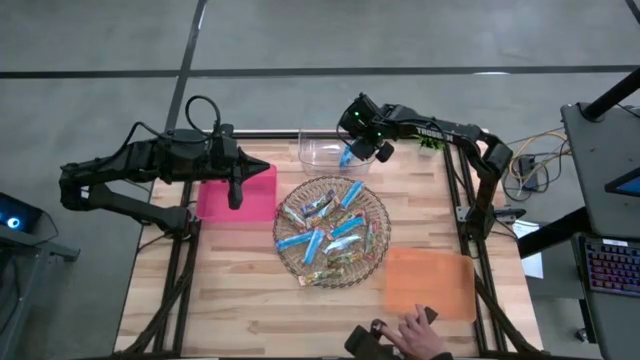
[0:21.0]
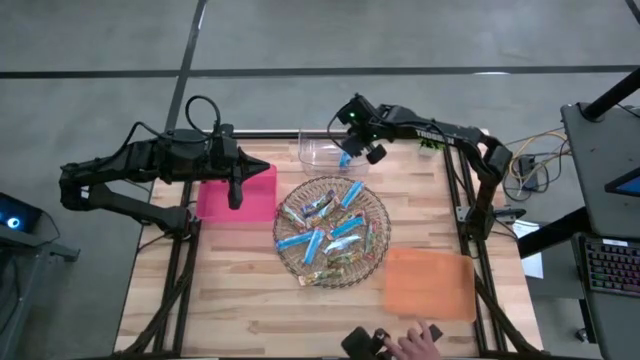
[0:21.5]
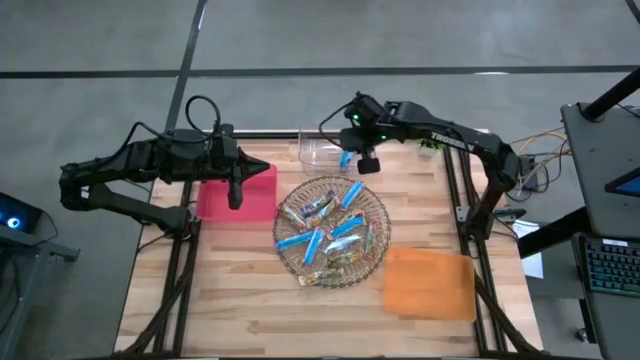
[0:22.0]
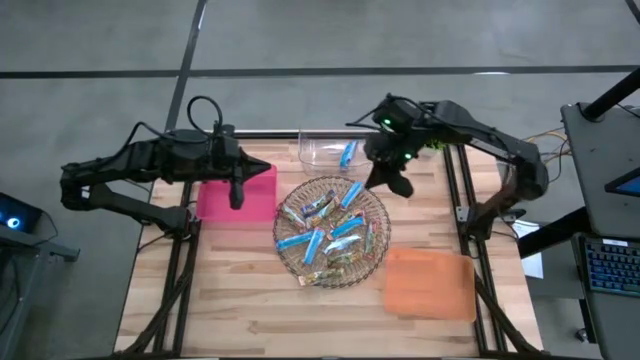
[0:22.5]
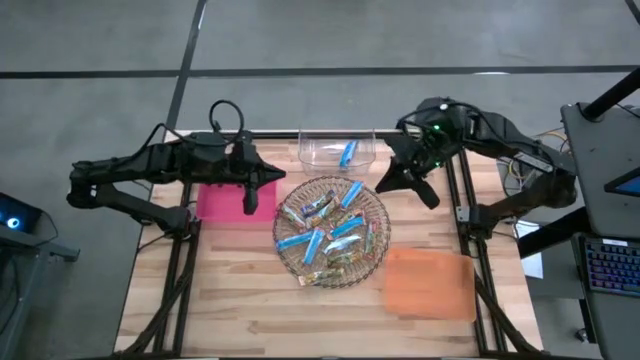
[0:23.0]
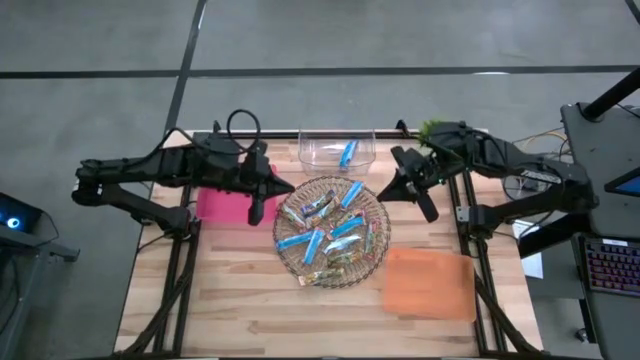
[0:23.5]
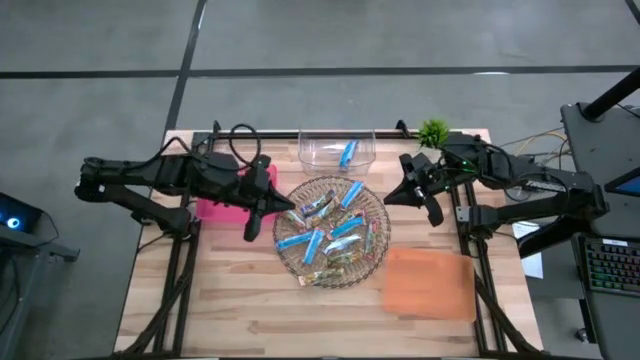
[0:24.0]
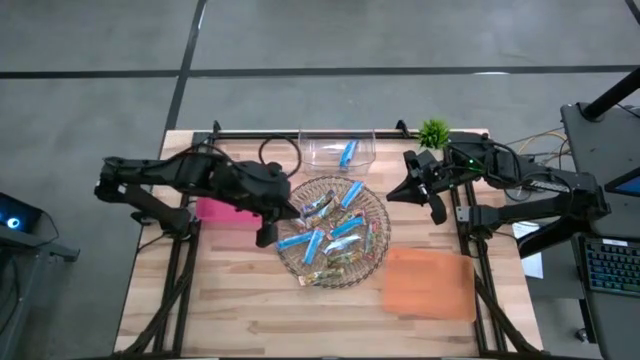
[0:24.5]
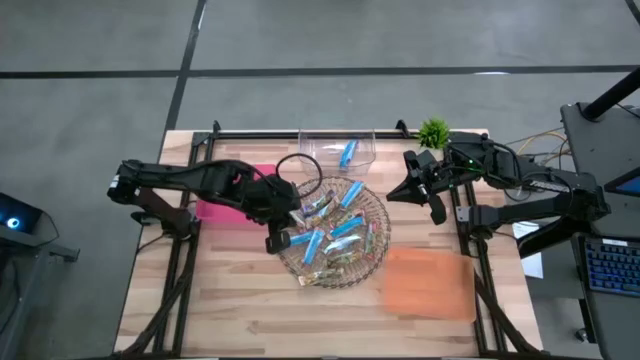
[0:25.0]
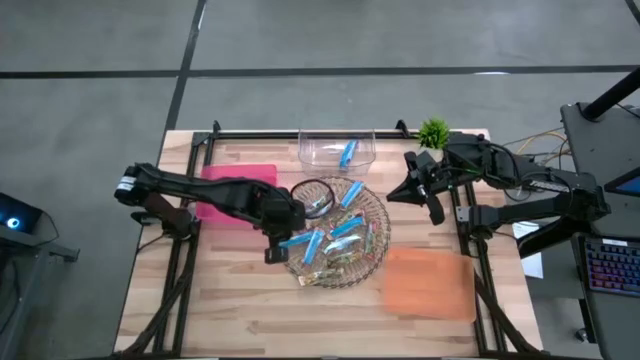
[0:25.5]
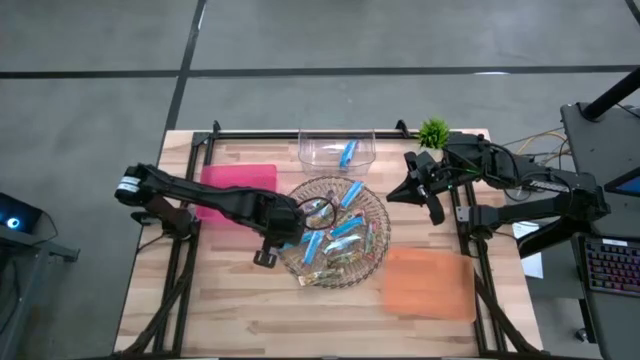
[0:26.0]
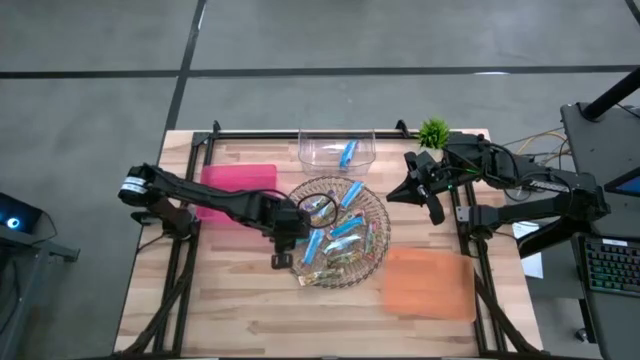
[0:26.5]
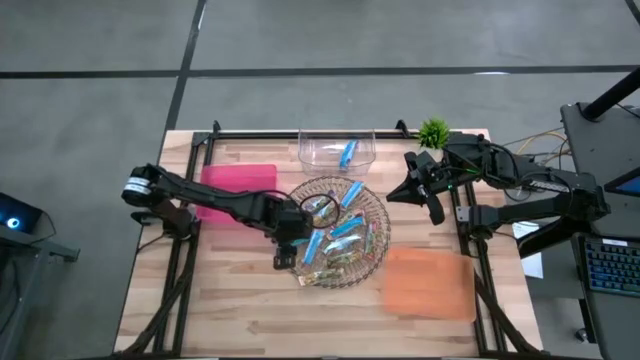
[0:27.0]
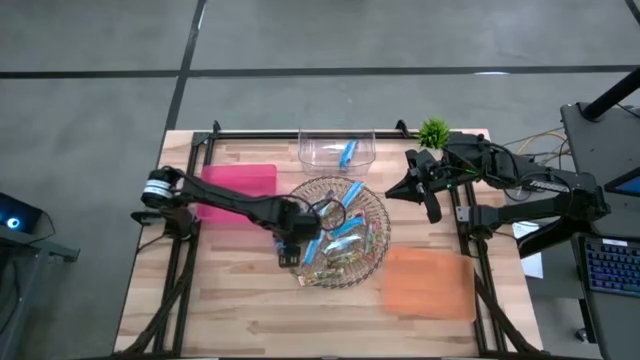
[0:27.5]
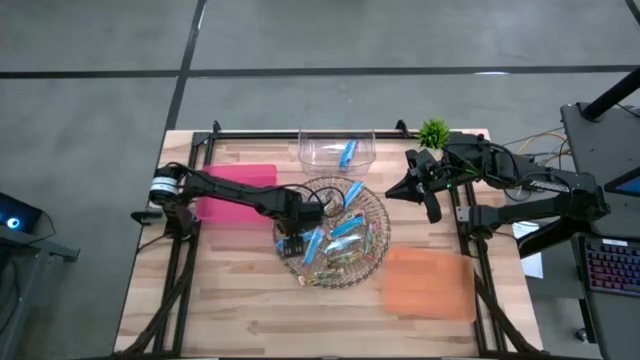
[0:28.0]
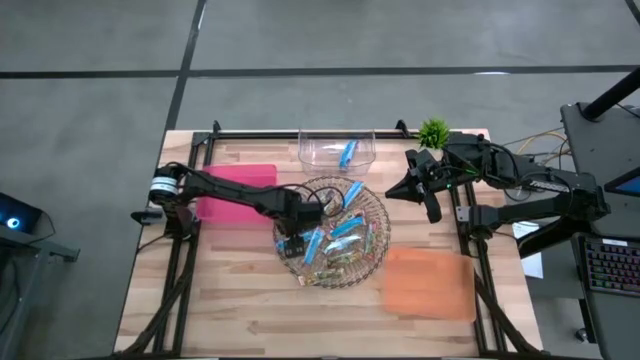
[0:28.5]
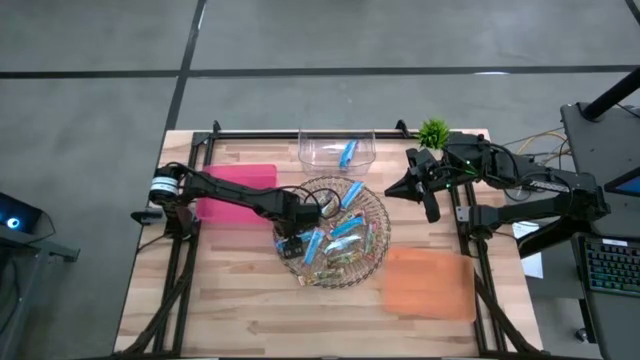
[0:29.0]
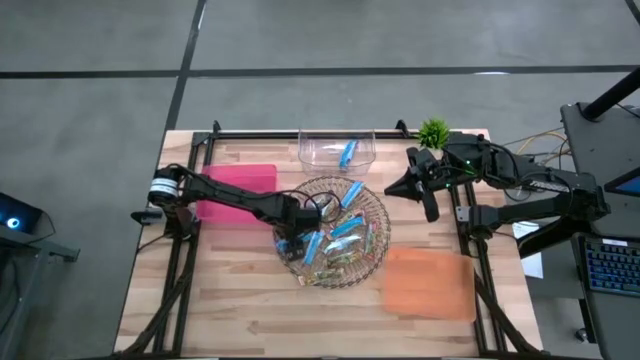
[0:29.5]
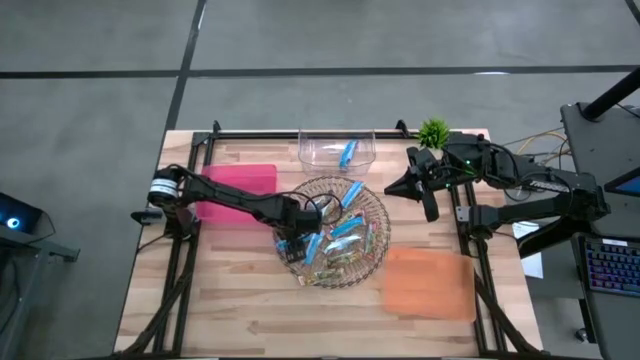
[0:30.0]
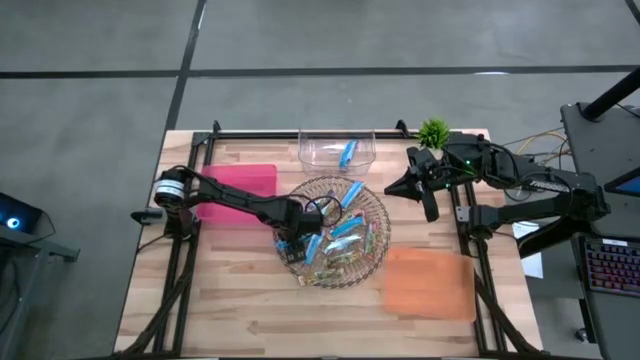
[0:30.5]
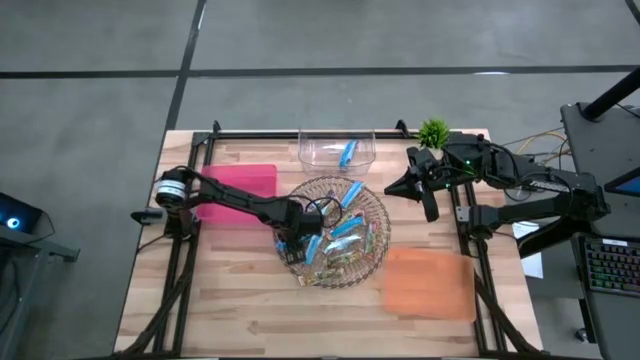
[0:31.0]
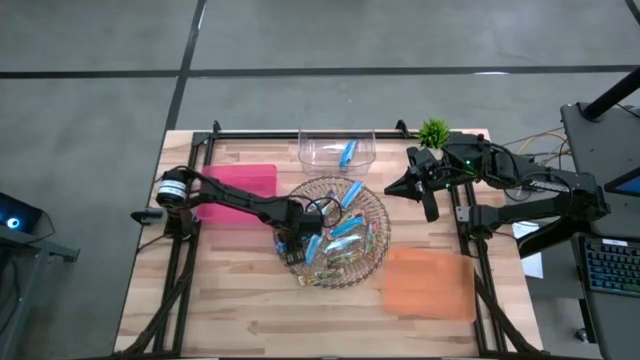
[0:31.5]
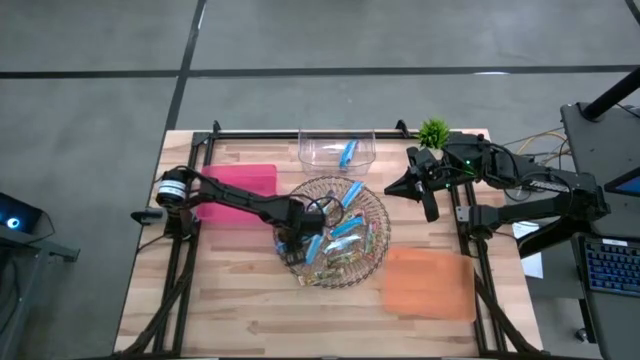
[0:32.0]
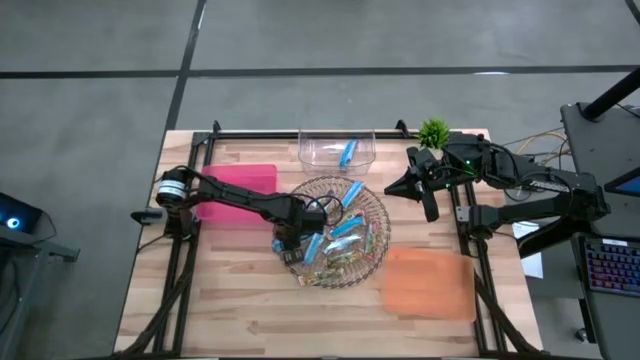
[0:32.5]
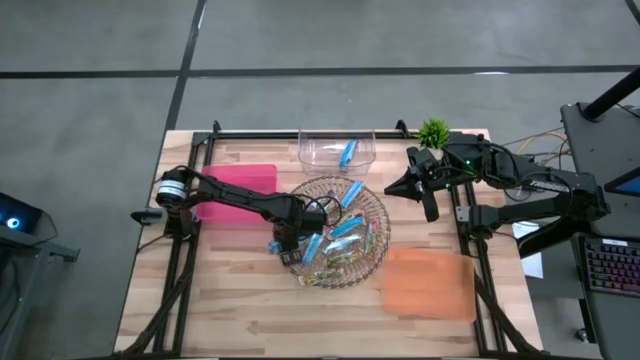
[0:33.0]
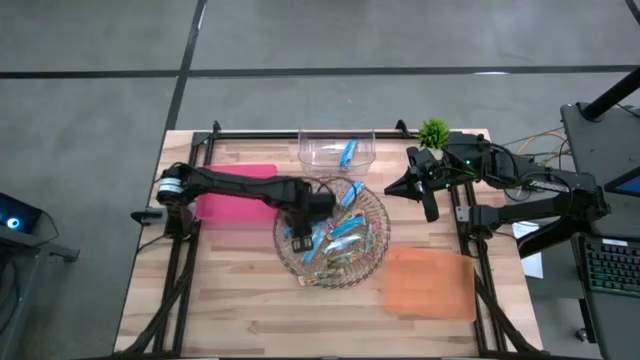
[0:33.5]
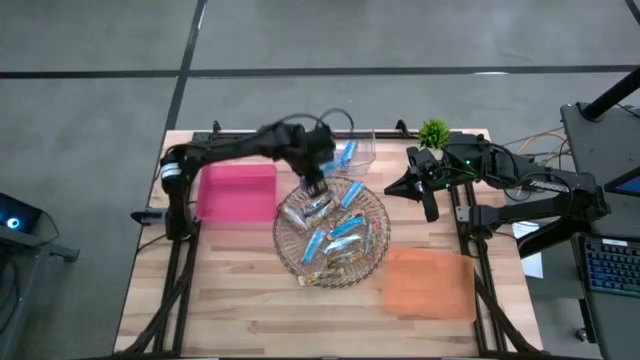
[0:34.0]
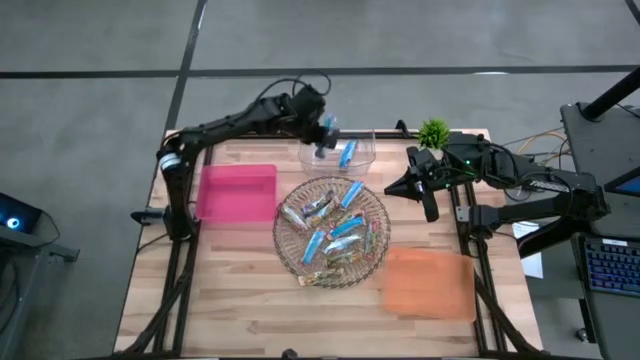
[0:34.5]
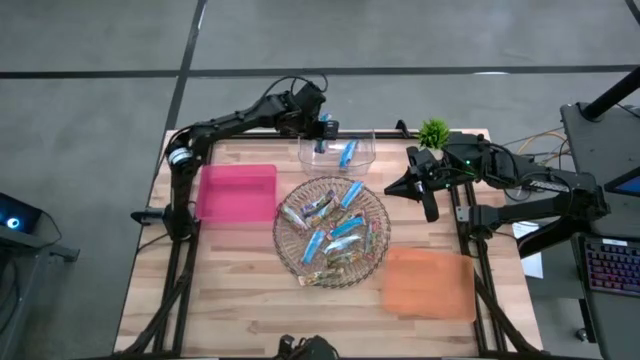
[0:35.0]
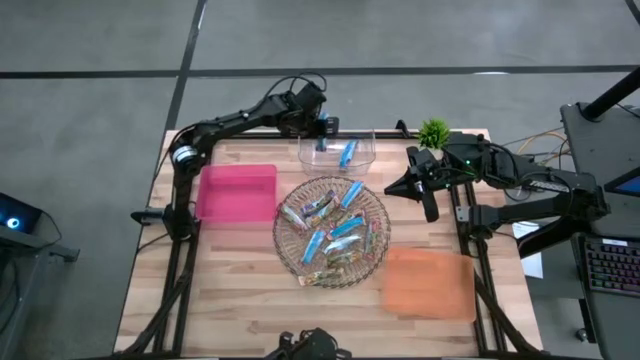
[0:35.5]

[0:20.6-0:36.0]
Task: Pick and place Granola Bars by type
Put the blue granola bar into the transparent bin

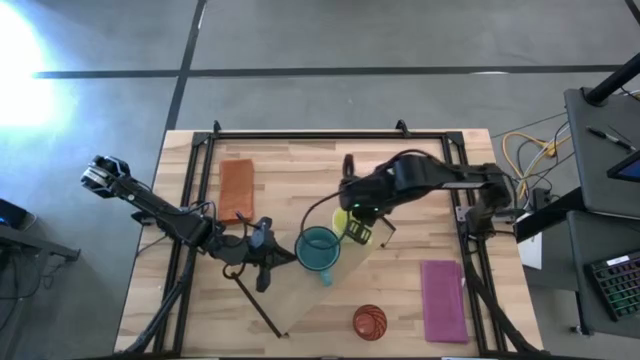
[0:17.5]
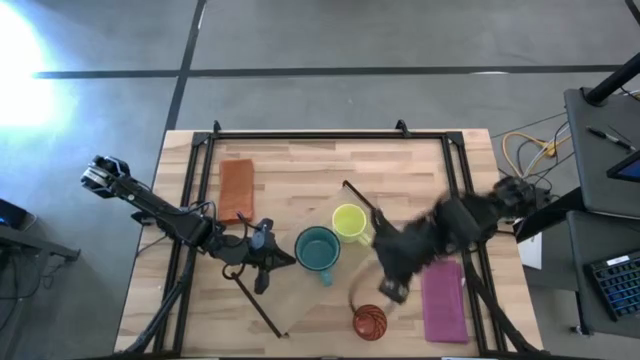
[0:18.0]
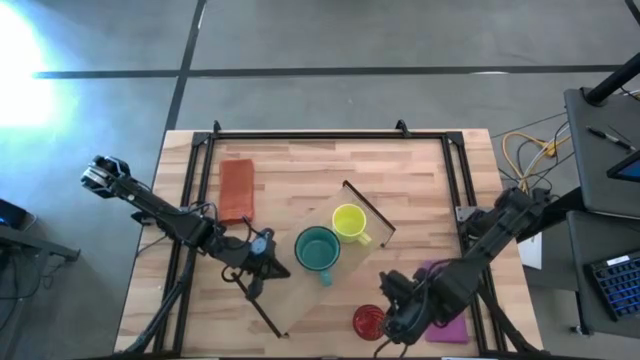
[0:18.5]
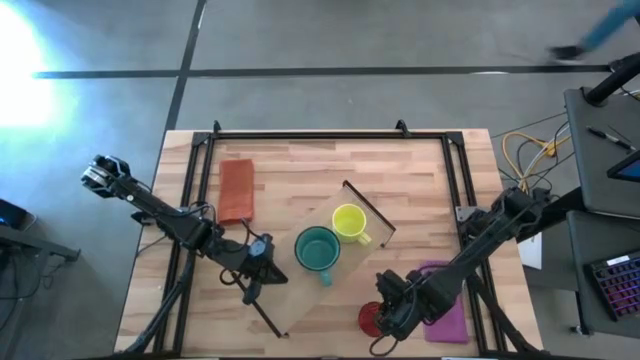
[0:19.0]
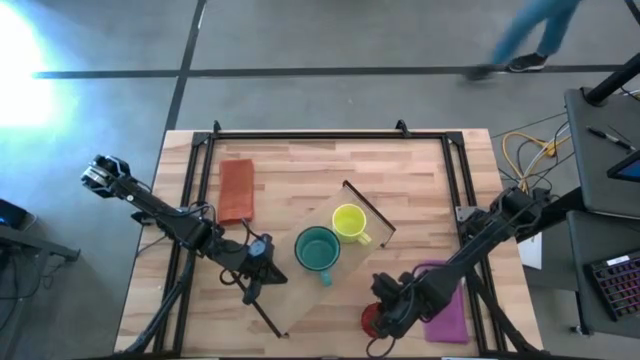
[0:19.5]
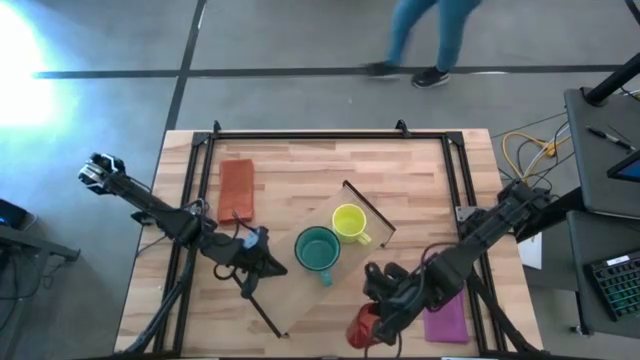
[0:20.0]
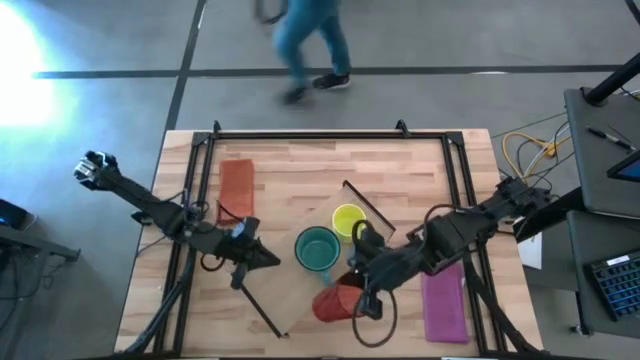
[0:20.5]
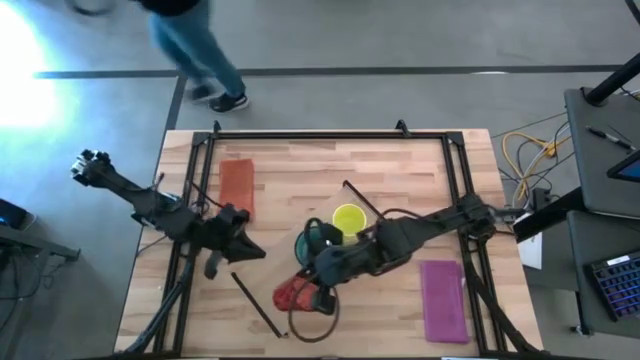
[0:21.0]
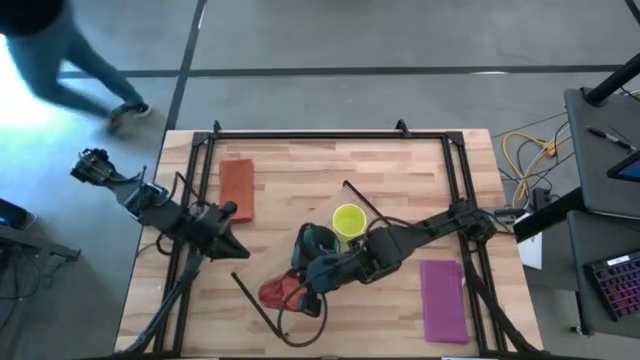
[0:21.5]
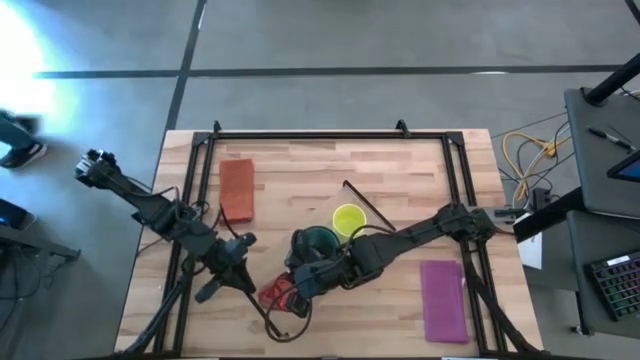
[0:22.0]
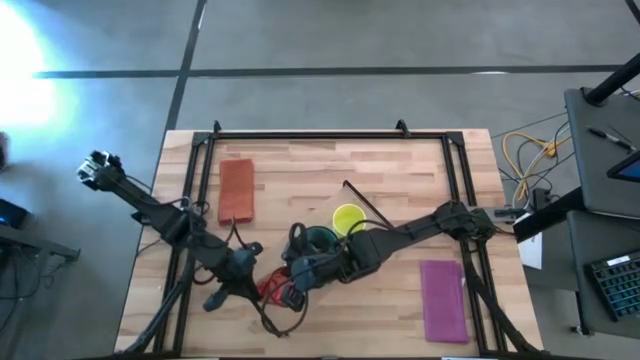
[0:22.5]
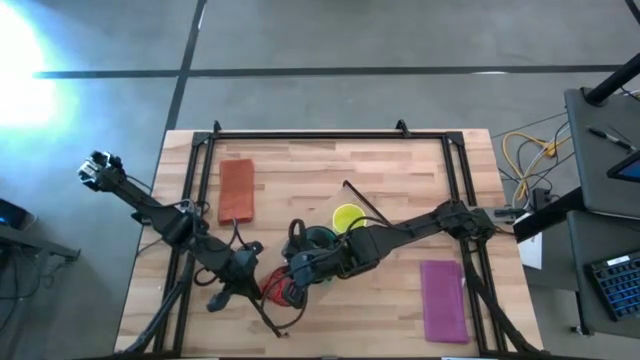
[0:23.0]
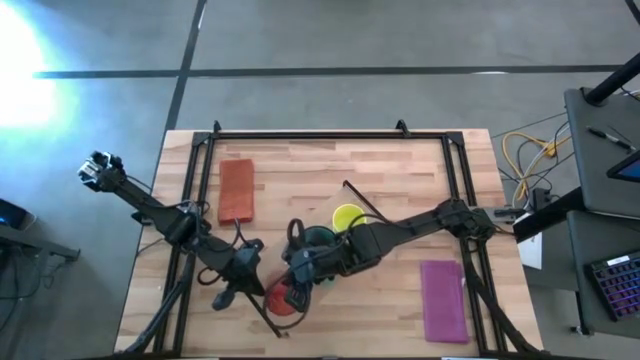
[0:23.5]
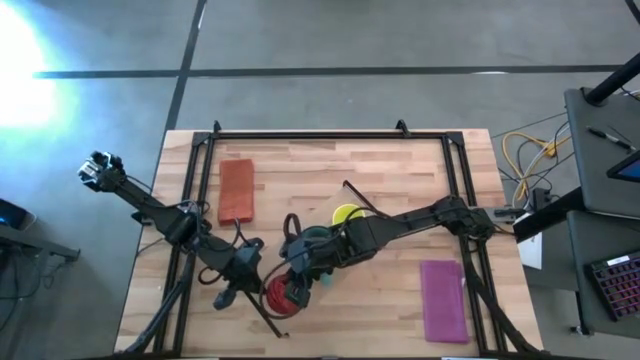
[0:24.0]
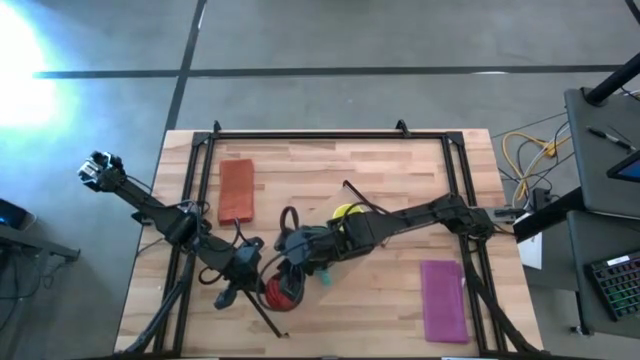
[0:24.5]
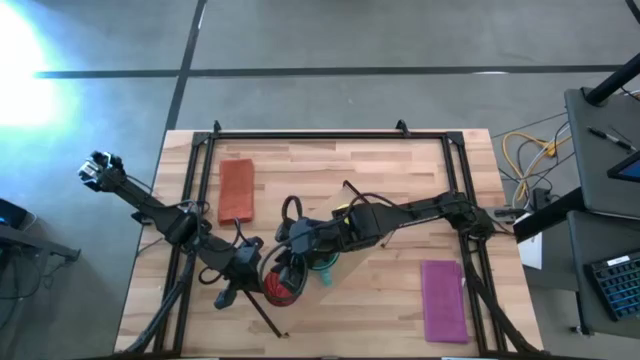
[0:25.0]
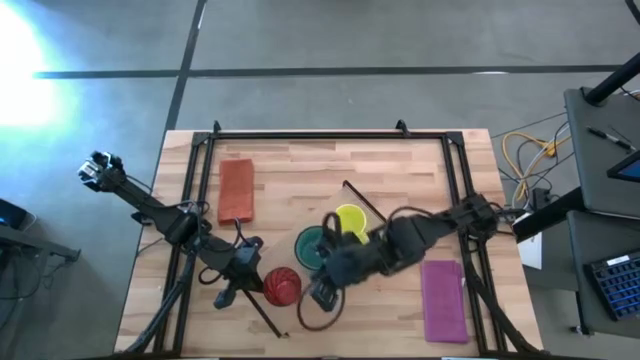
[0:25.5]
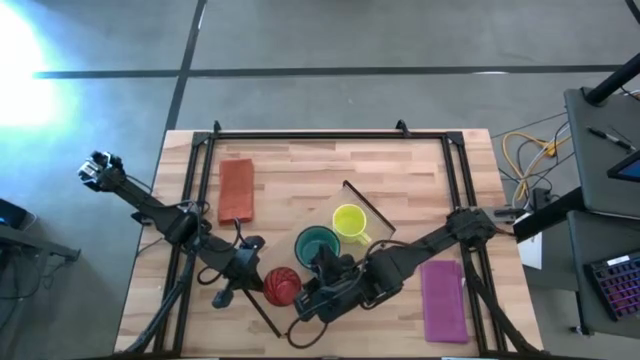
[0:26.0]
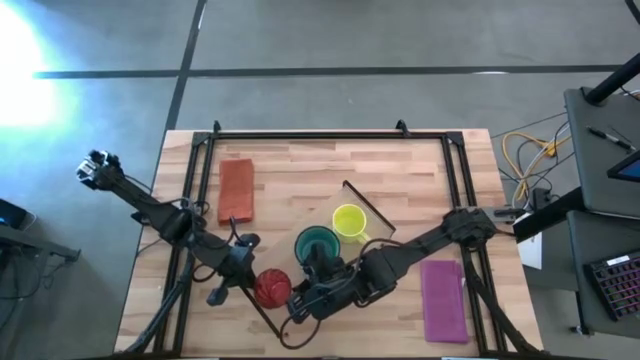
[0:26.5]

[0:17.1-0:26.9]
Task: Stack small to large cups/mugs on shelf
Put the orange glass on the shelf
